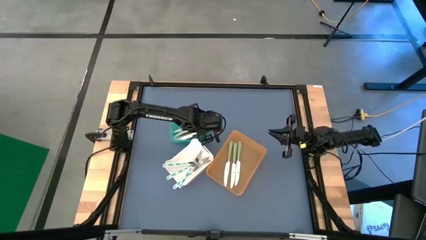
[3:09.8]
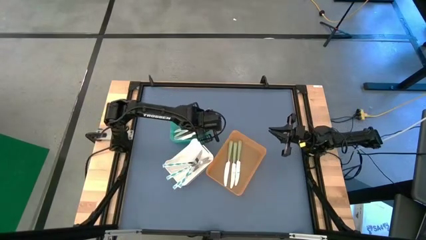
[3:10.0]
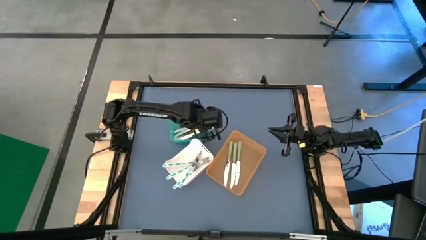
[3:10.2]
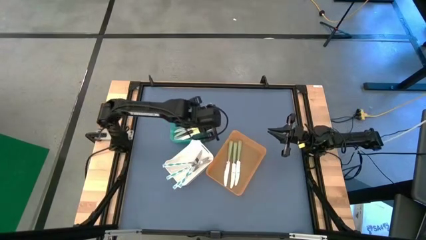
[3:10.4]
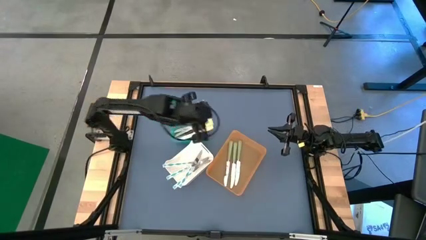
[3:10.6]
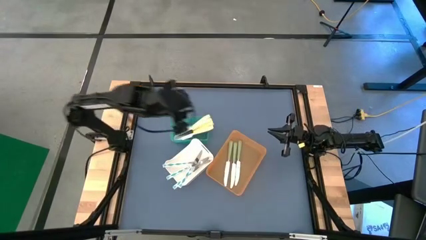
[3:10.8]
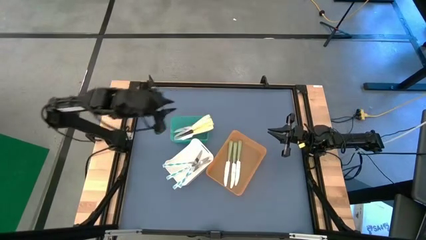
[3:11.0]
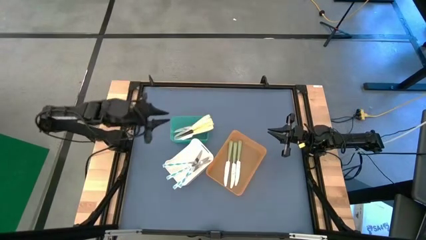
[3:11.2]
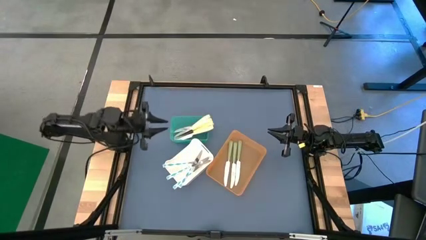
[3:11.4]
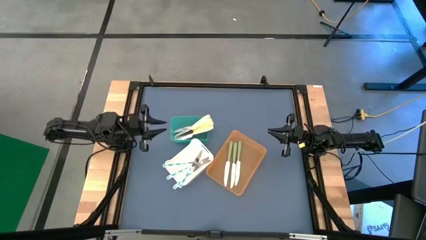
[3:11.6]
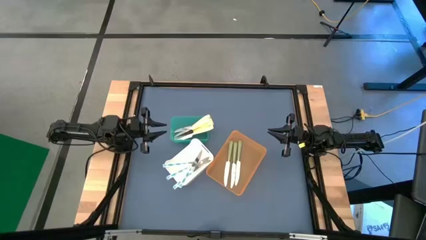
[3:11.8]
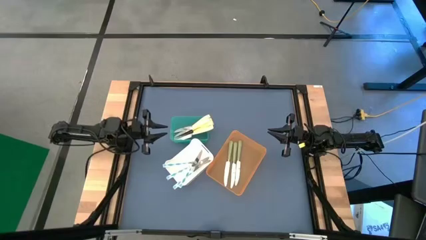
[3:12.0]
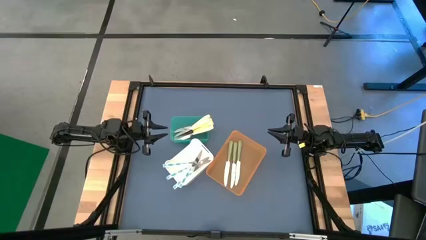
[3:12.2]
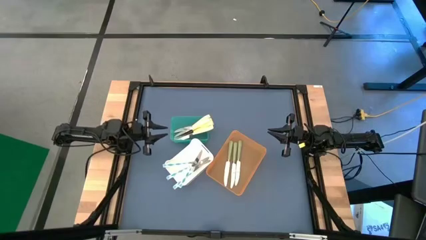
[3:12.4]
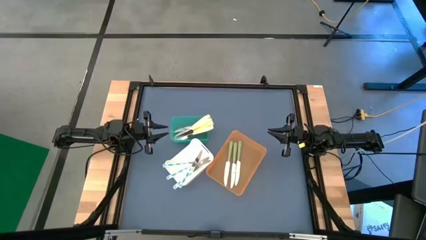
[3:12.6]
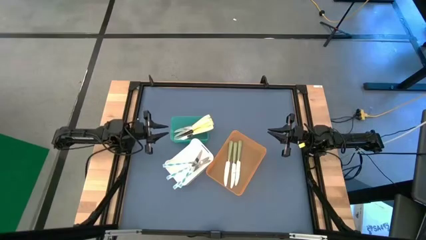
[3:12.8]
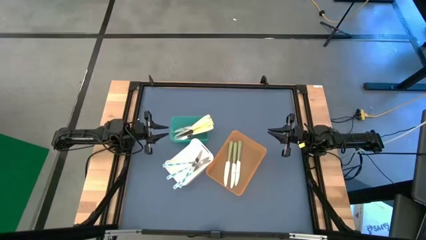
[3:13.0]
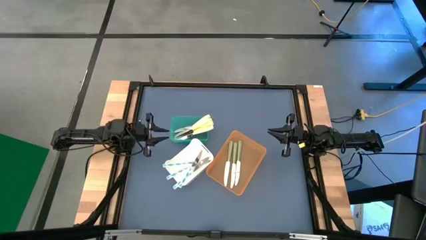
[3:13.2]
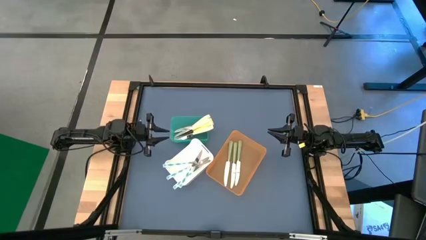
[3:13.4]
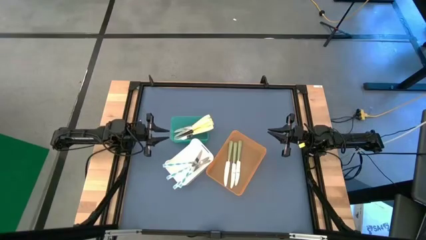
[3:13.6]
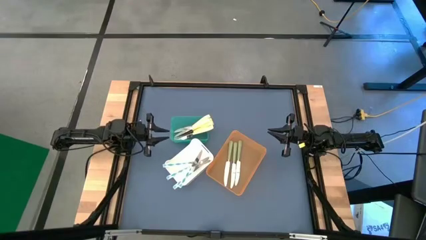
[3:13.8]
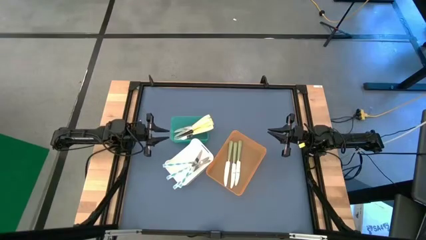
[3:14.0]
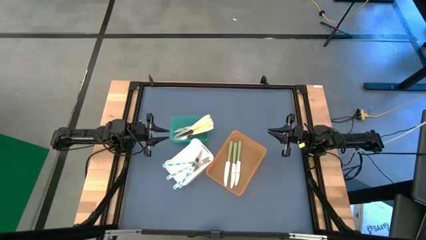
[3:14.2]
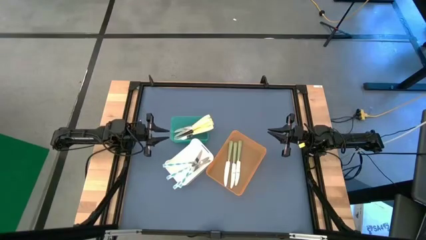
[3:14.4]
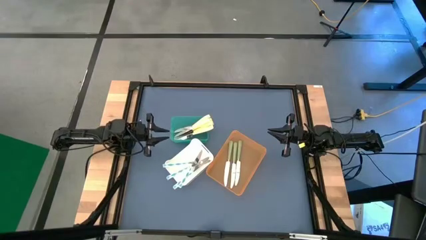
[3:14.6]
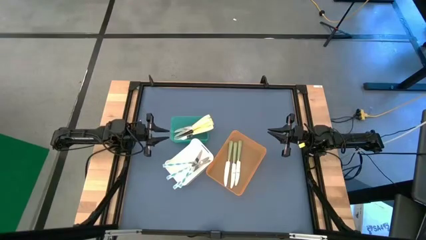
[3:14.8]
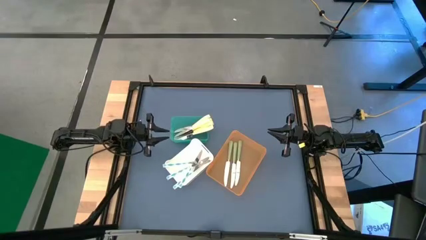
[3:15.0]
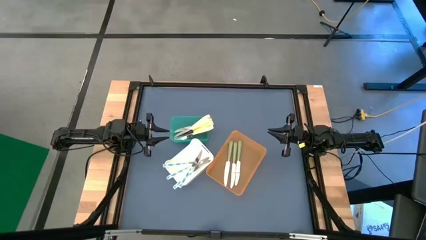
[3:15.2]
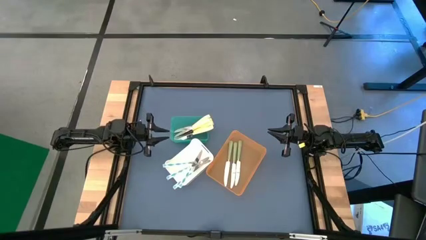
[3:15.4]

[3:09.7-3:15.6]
Task: Sort silverware by color (type)
Return to Home Position

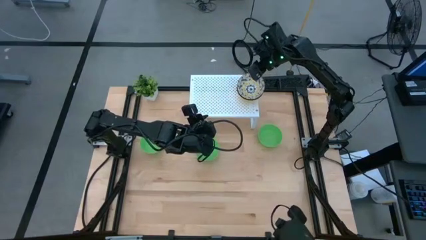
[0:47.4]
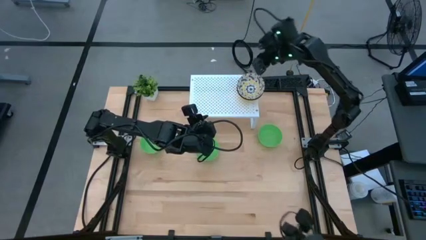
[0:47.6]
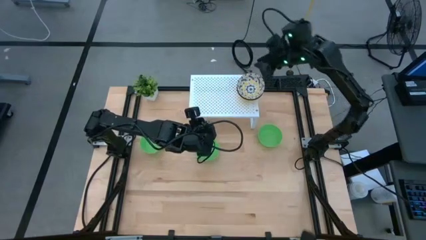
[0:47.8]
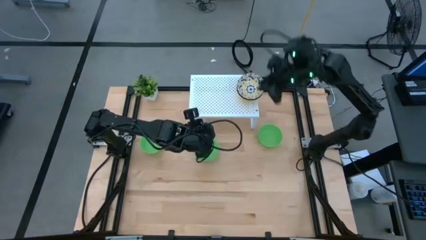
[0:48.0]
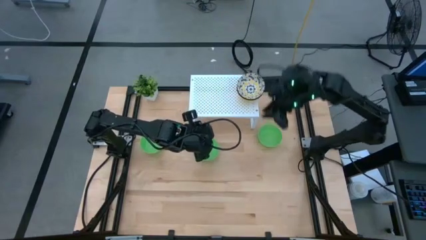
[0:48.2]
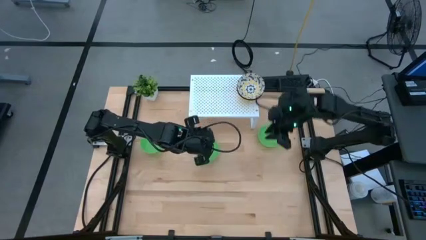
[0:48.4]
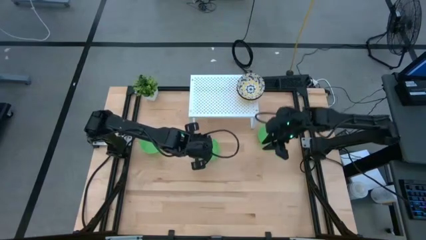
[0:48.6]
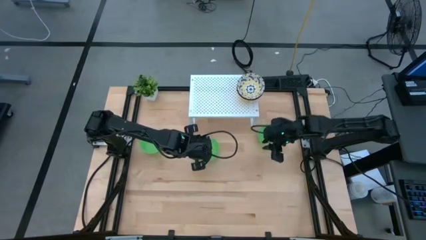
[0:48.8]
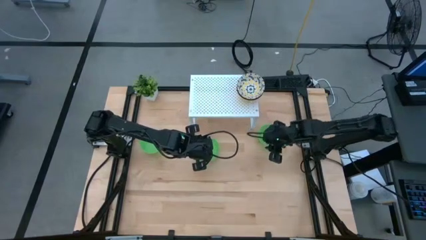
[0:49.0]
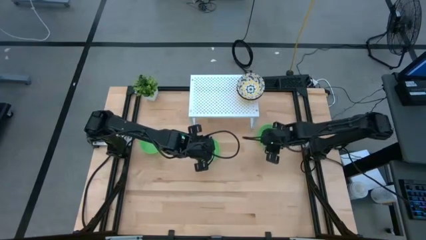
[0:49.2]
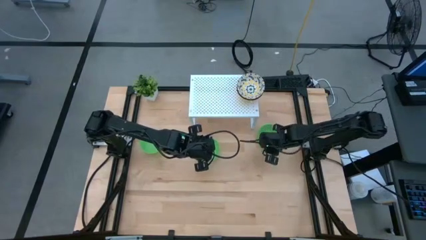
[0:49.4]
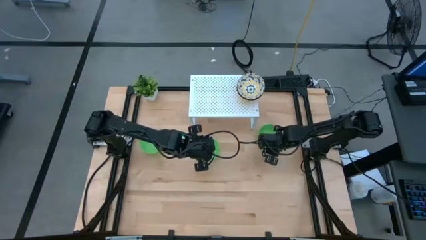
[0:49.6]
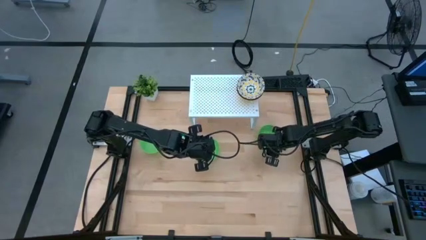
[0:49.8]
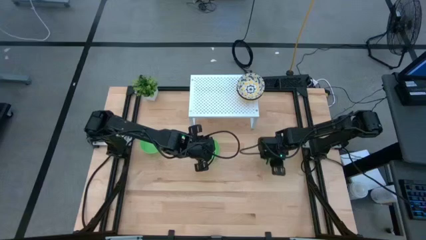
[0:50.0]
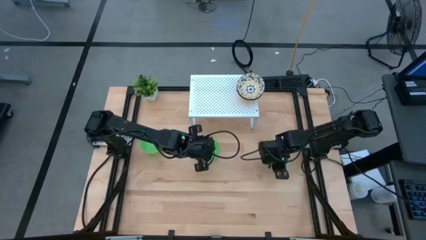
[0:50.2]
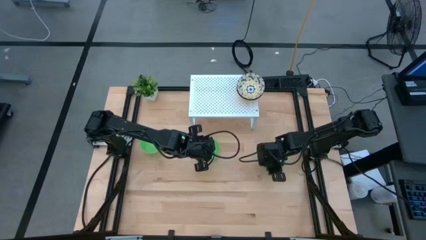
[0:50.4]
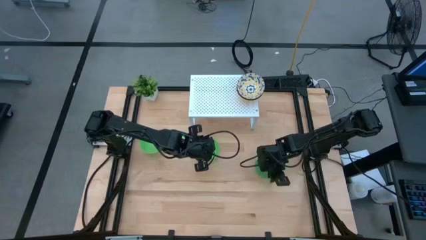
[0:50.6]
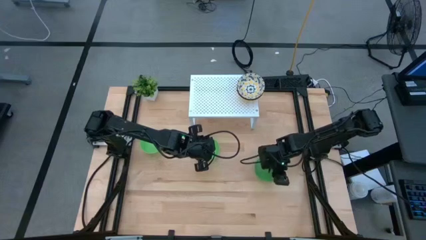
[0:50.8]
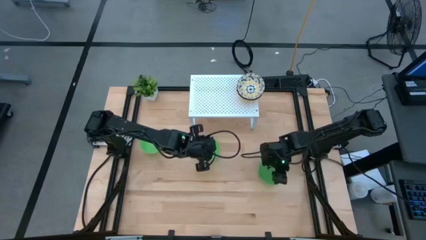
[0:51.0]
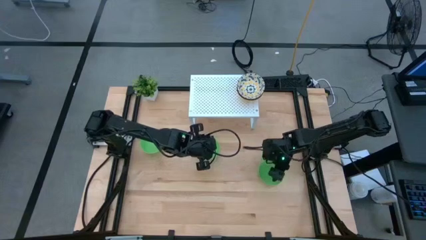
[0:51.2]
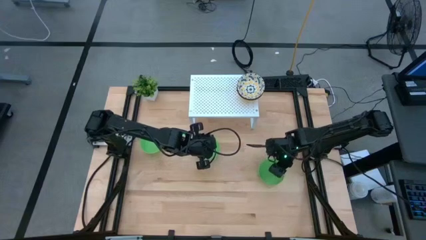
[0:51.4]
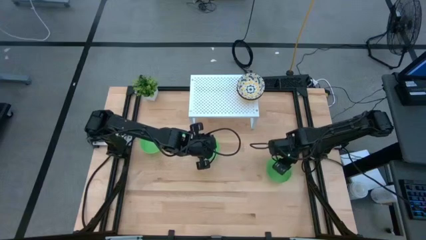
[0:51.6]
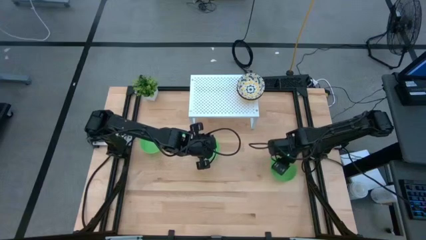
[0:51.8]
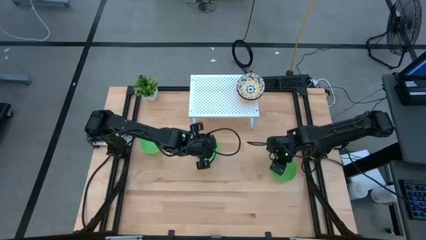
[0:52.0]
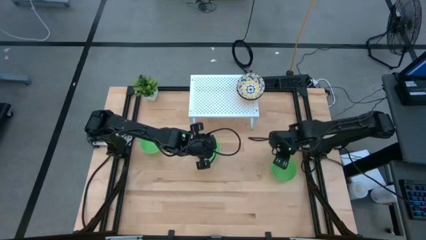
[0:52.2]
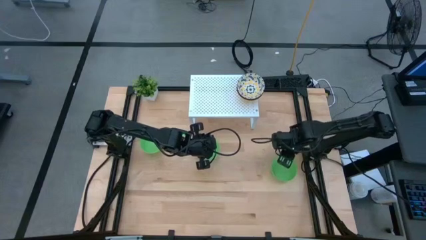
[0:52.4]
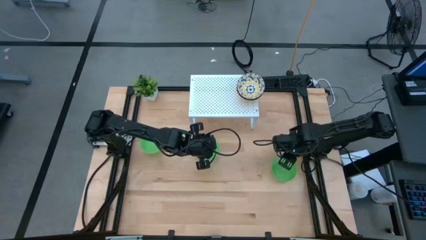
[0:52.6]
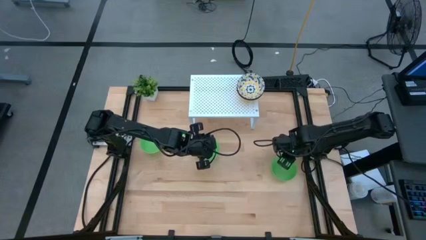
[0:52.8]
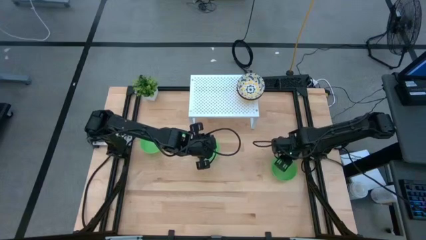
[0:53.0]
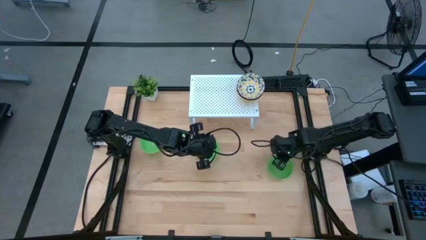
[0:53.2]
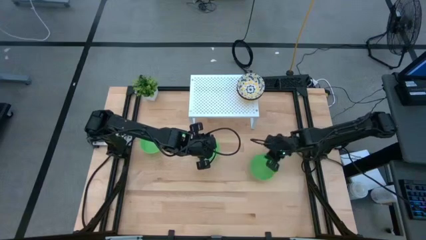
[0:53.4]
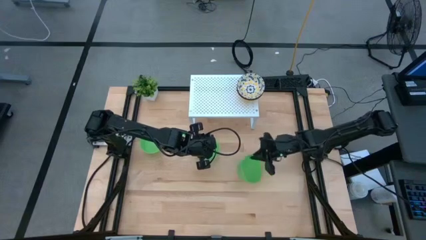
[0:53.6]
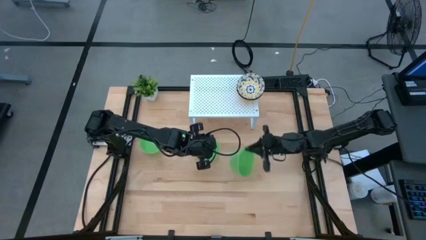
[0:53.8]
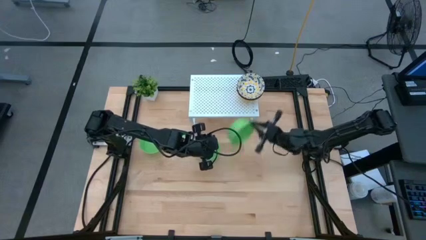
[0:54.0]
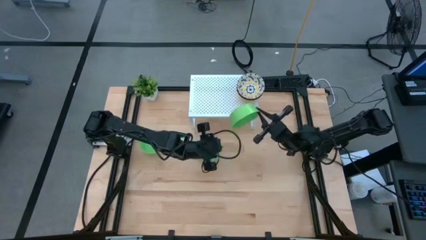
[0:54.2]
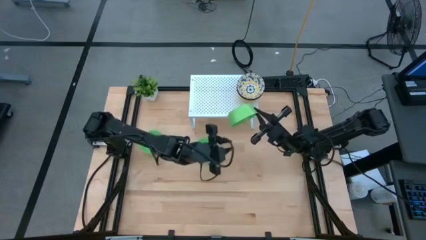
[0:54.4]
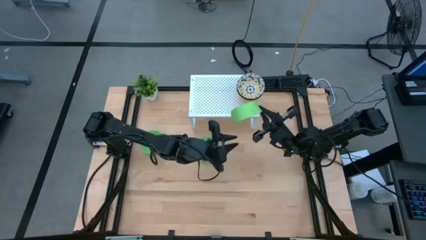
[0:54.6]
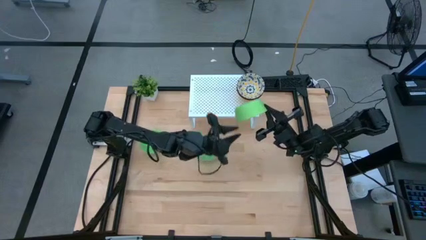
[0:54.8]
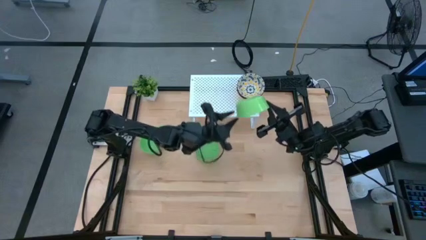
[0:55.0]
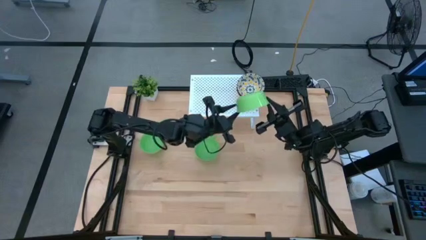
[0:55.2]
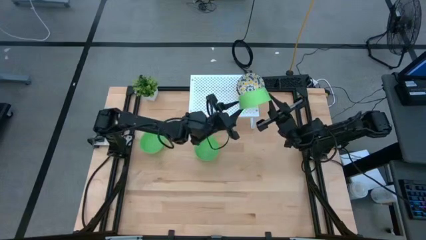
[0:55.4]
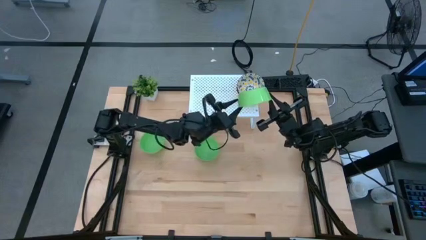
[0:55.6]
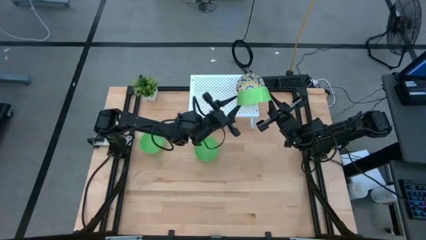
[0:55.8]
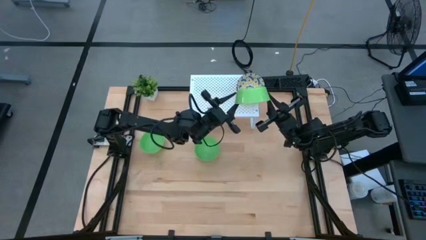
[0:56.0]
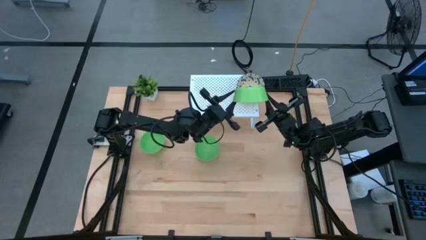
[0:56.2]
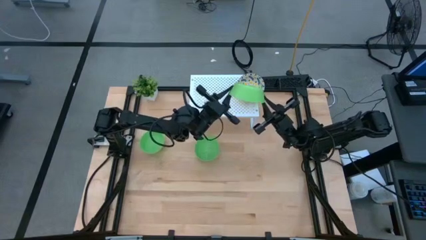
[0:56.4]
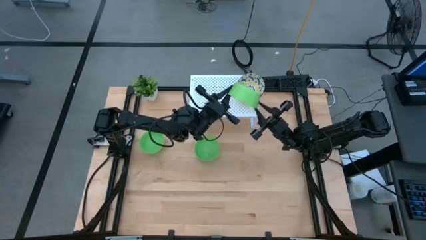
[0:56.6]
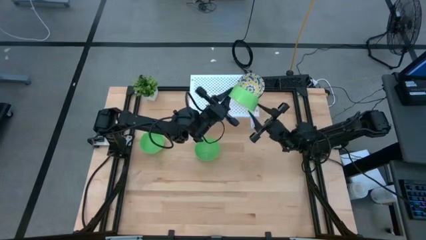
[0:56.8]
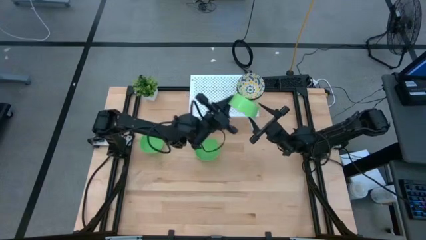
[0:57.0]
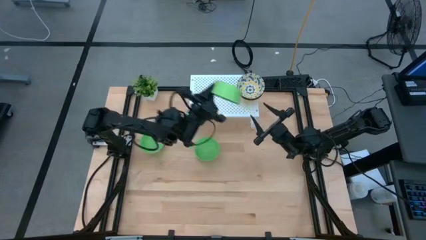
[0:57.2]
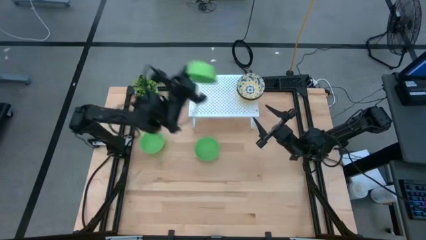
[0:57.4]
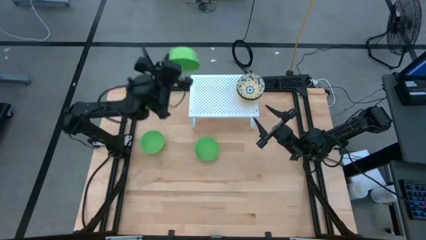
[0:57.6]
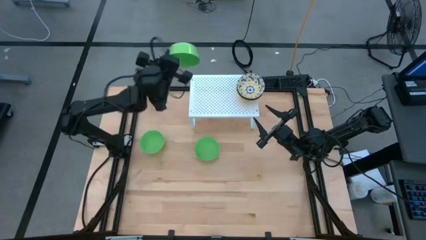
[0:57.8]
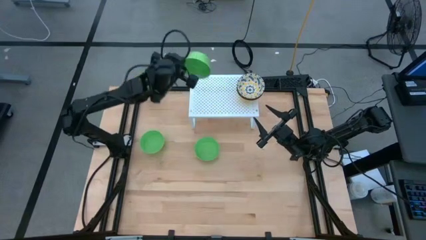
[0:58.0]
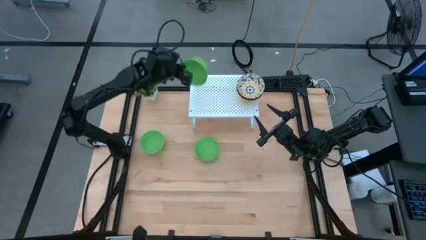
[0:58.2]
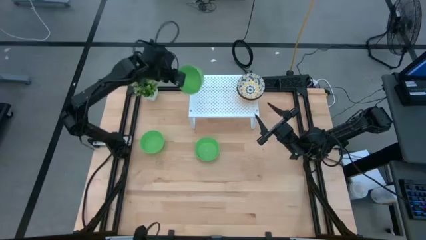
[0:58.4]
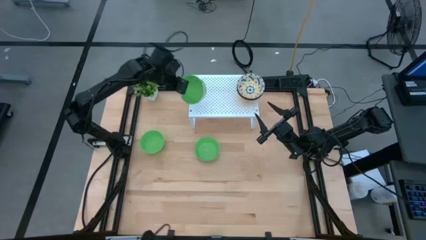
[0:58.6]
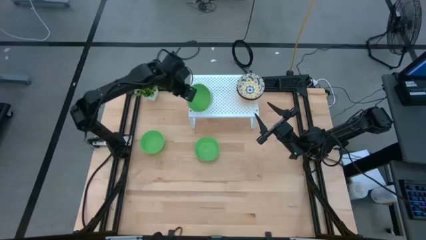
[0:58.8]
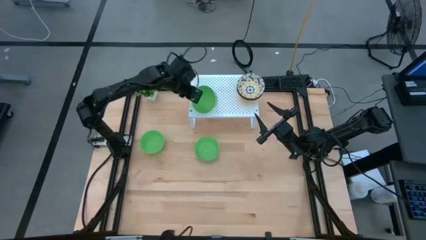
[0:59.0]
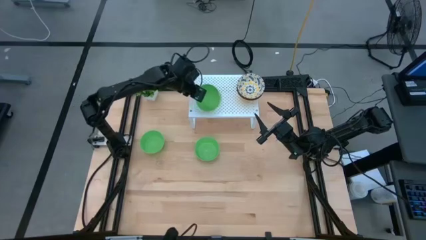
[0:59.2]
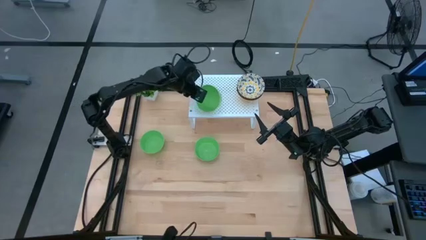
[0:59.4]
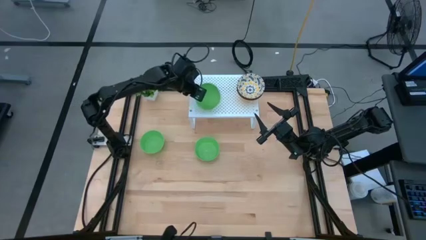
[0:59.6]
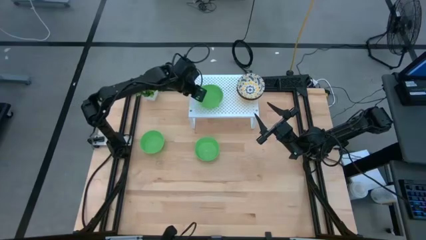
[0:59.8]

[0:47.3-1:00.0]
Task: Pick & Place Mini bowls
Put the green bowl on the shelf
